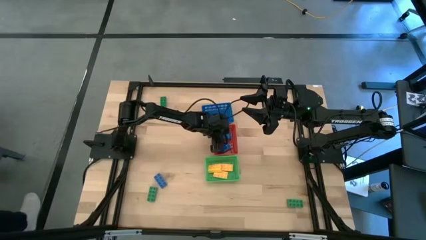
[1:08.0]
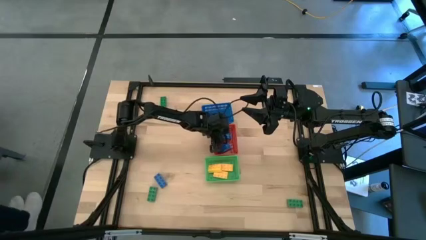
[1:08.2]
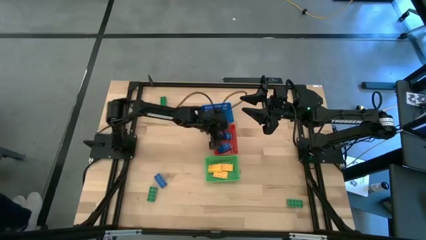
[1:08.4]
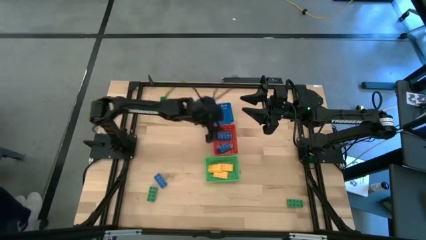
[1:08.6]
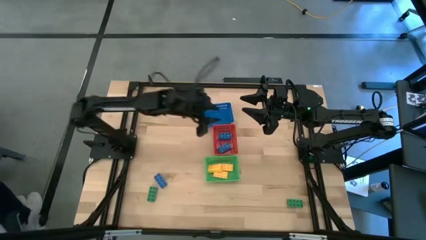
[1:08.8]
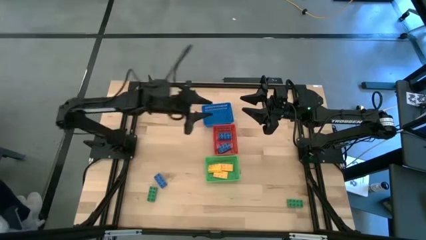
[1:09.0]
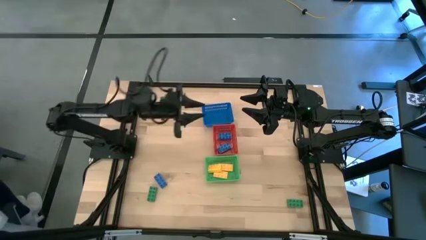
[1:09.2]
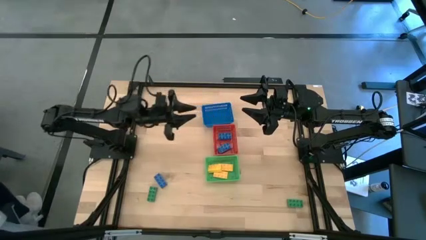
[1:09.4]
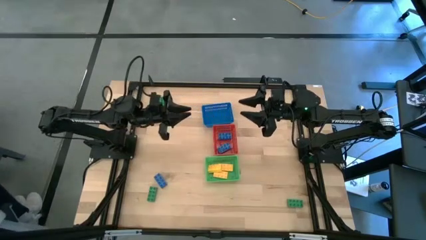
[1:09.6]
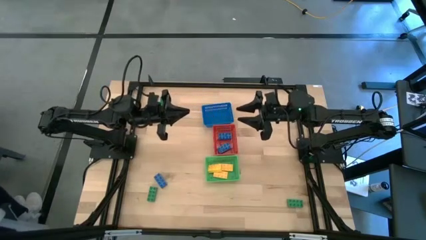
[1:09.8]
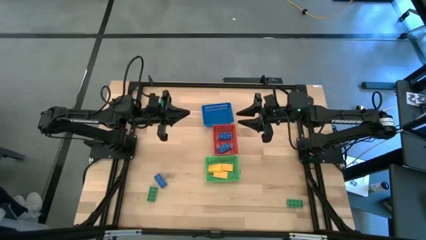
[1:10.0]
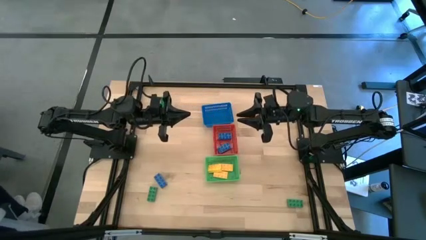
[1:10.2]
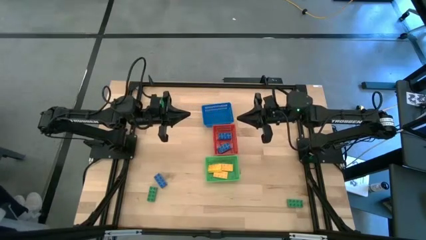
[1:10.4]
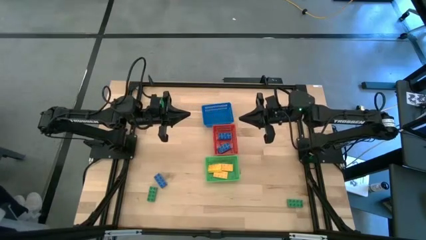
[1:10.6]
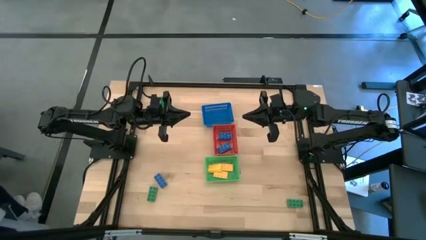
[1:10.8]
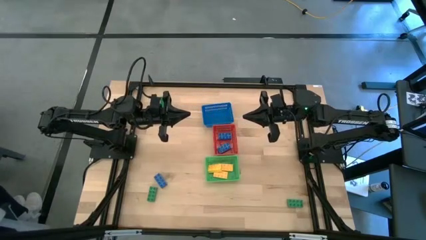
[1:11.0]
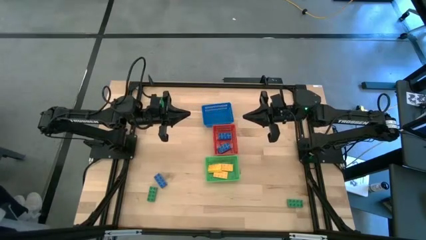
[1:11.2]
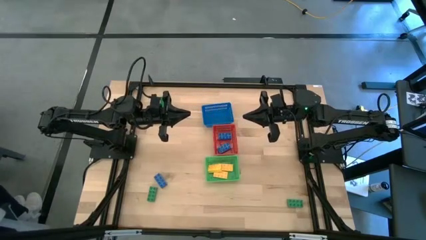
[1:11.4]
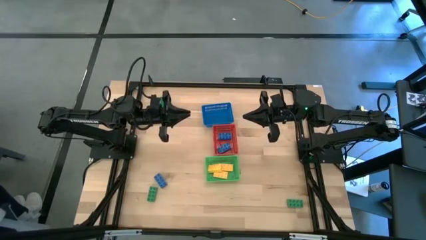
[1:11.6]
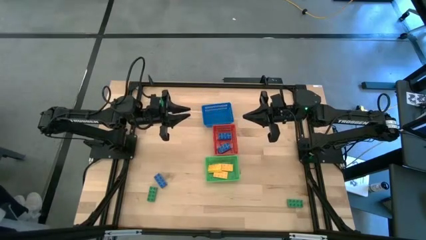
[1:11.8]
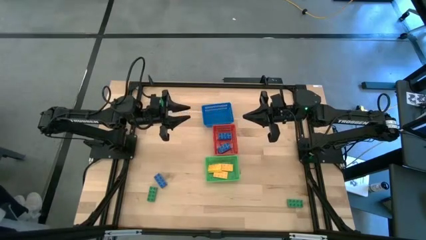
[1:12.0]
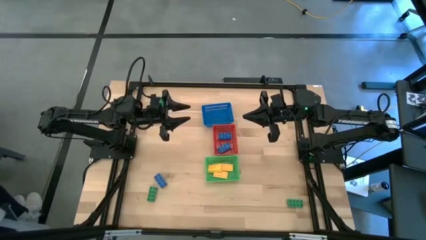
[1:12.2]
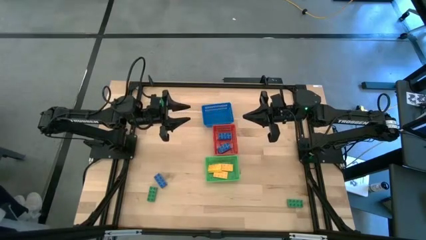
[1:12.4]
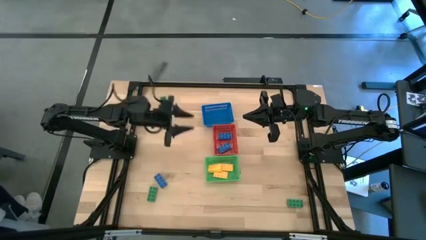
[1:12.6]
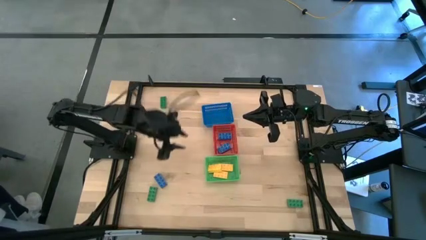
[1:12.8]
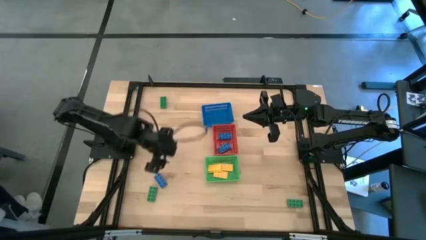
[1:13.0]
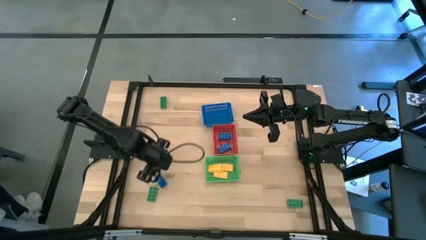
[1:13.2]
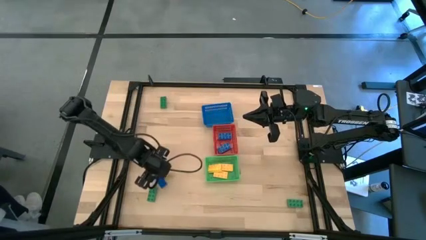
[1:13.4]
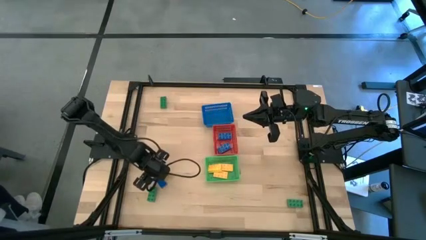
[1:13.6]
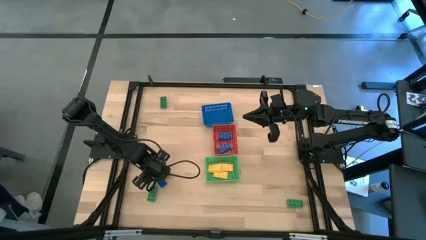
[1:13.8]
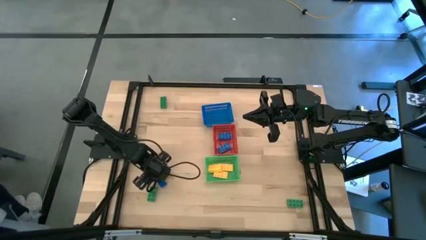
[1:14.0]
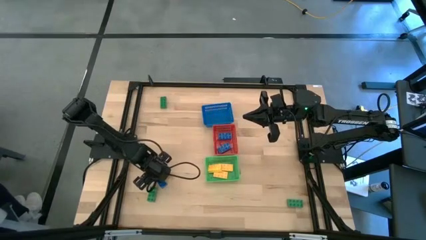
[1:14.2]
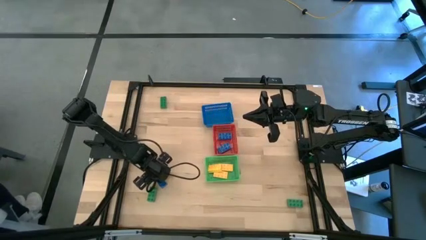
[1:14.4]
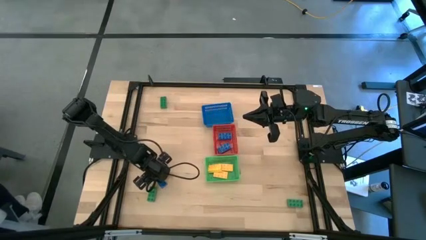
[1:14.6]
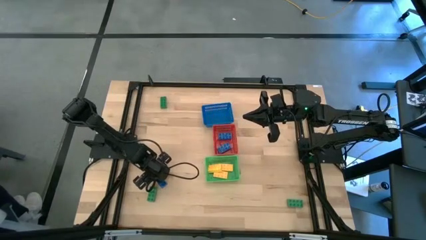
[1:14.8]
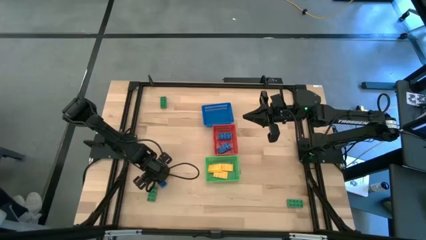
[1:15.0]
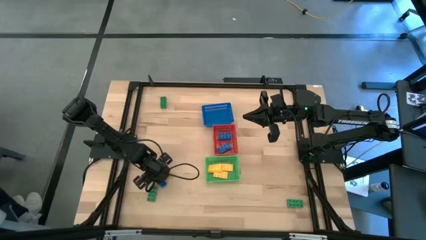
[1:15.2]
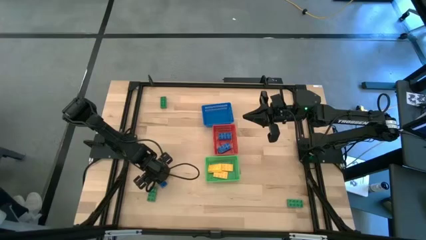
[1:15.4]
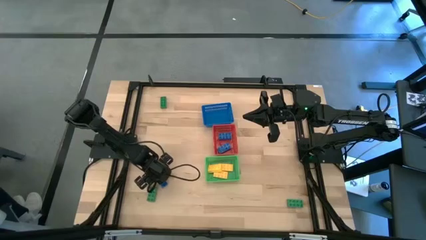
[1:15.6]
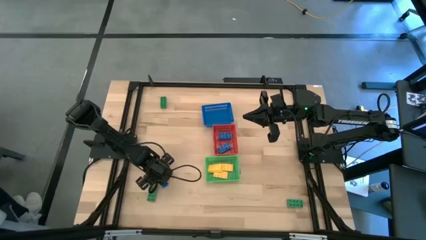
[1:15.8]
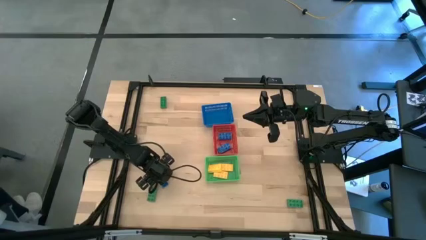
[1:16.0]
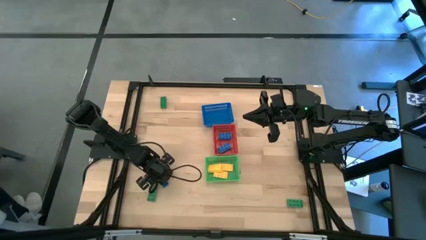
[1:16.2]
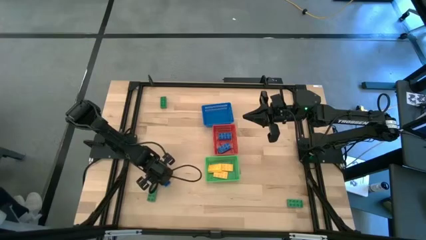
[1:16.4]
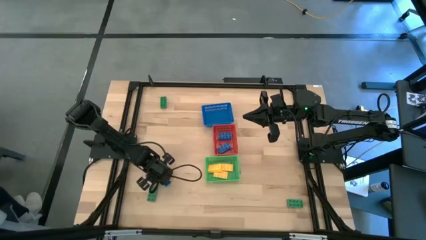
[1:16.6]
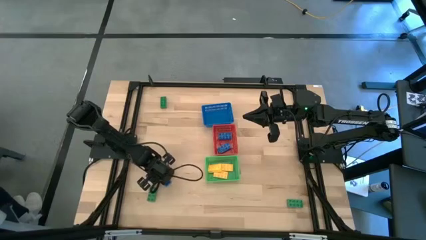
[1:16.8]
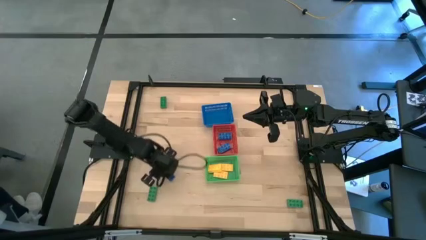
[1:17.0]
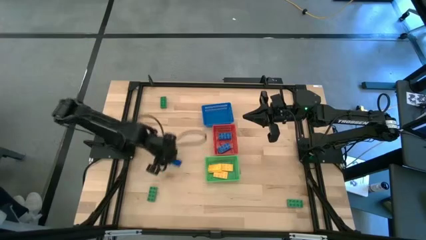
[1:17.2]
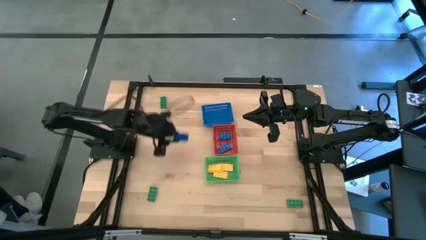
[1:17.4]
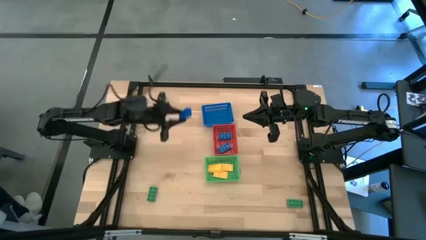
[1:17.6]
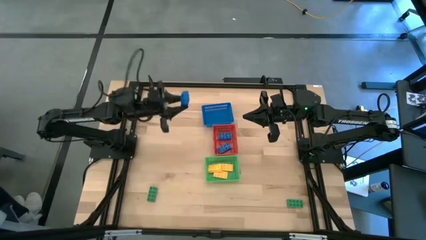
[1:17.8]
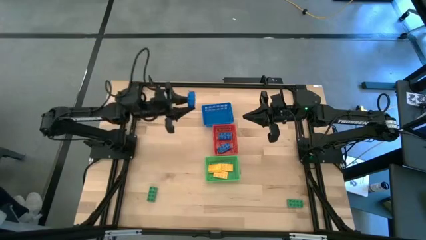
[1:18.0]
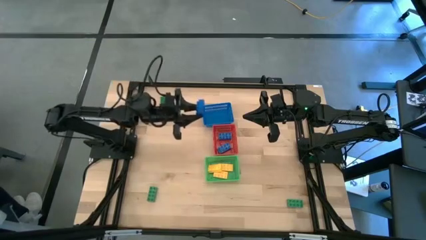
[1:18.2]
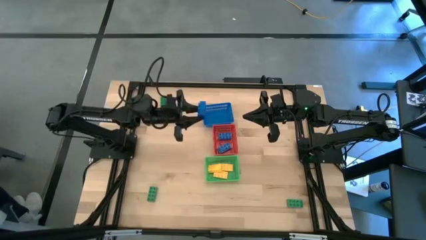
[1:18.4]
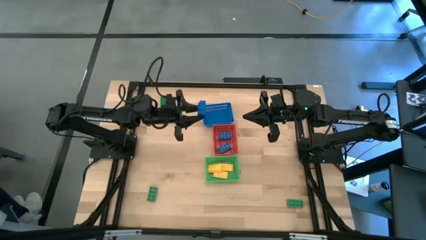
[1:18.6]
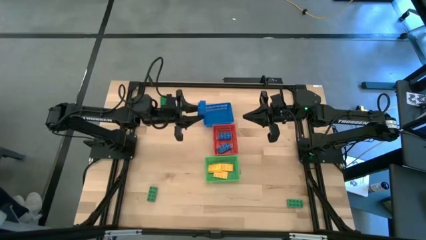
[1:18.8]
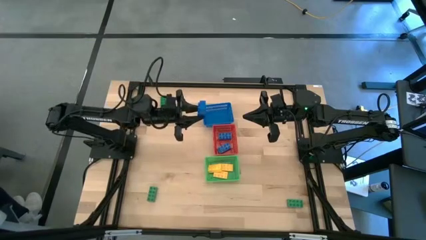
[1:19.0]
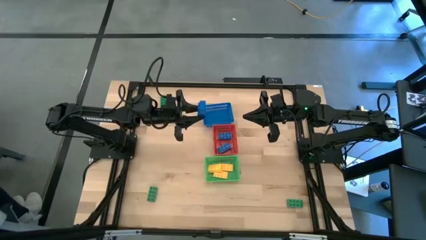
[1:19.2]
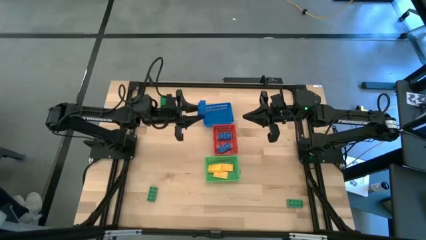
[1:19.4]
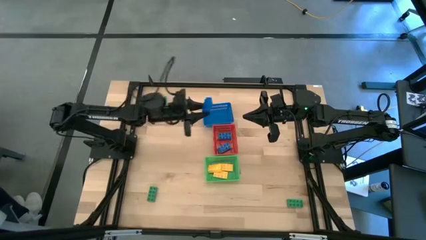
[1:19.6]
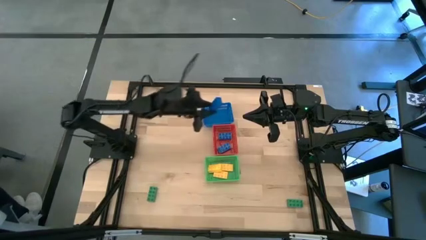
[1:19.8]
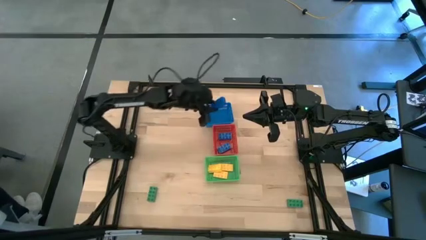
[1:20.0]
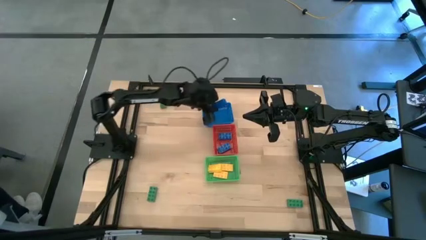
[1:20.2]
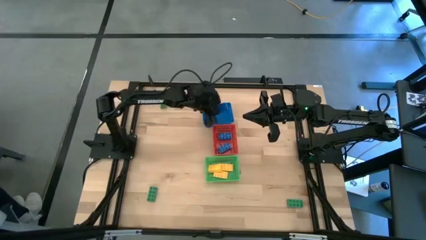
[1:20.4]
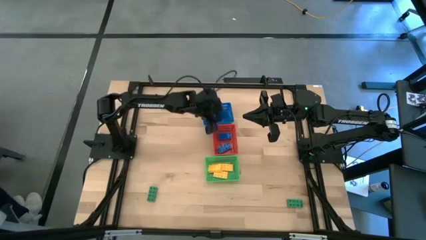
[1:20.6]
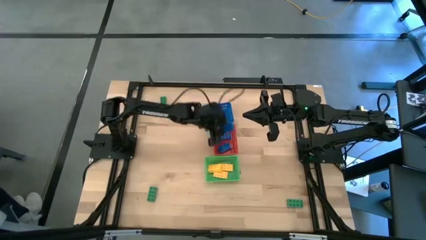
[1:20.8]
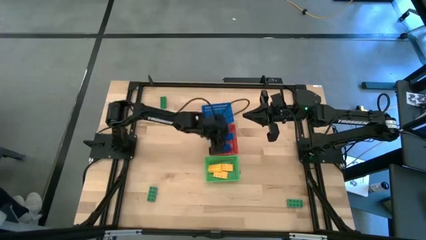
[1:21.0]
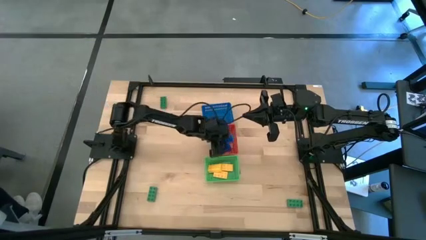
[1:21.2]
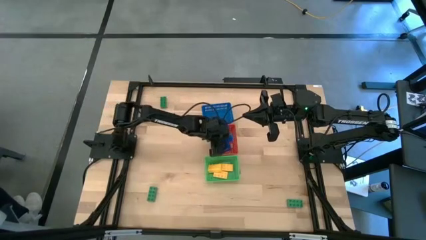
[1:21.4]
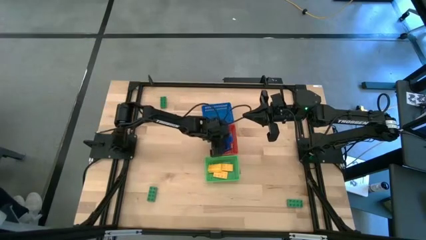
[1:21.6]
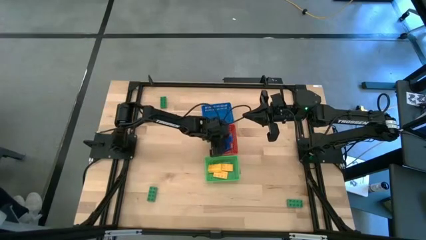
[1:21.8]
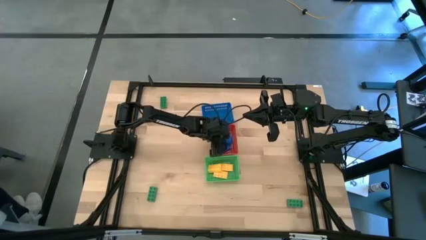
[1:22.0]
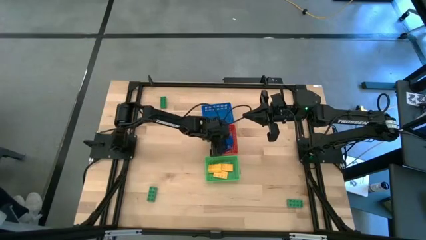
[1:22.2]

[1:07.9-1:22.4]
Task: Sort & place blocks by color
Put the blue game piece into the red basket
